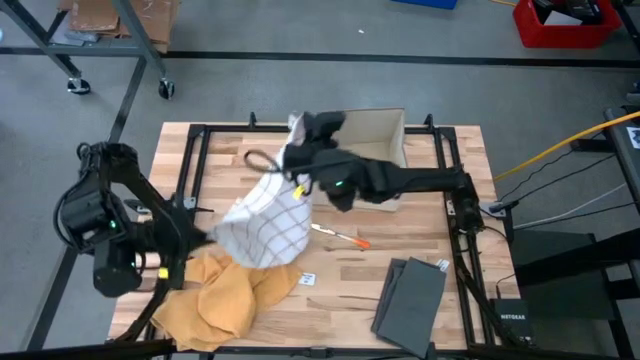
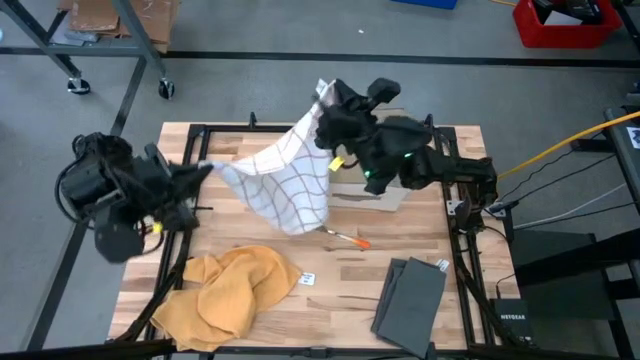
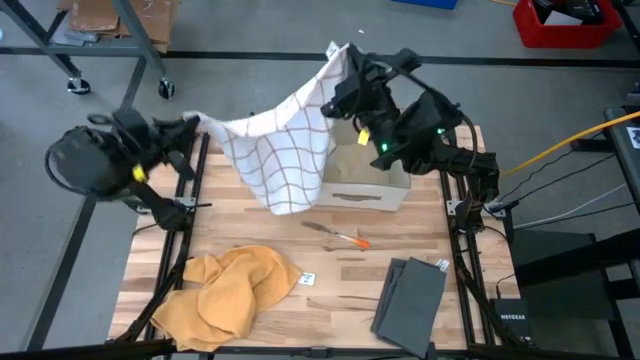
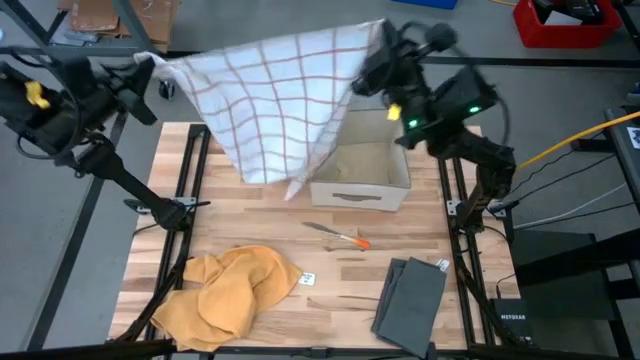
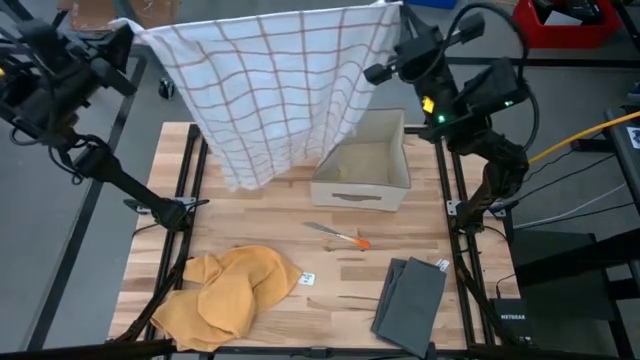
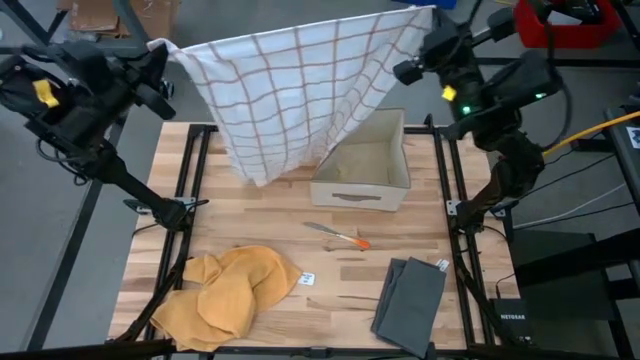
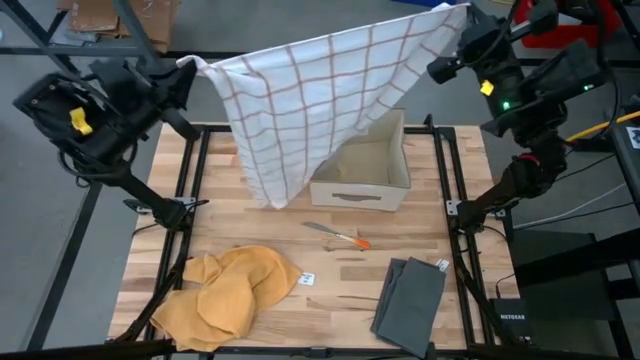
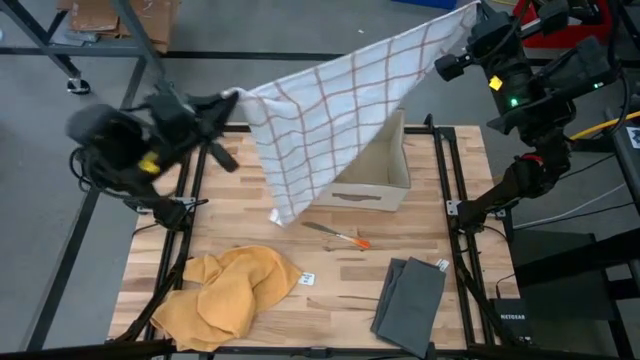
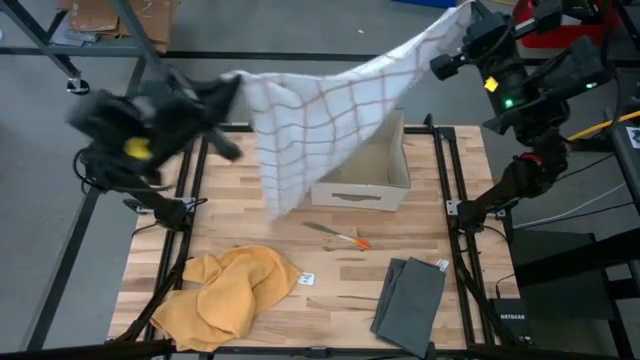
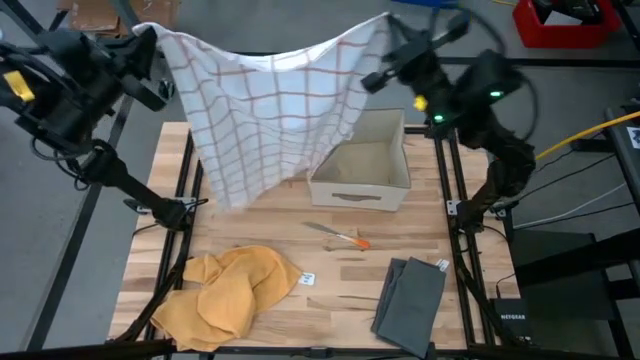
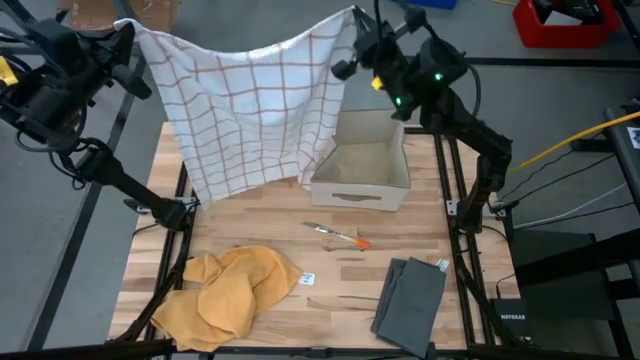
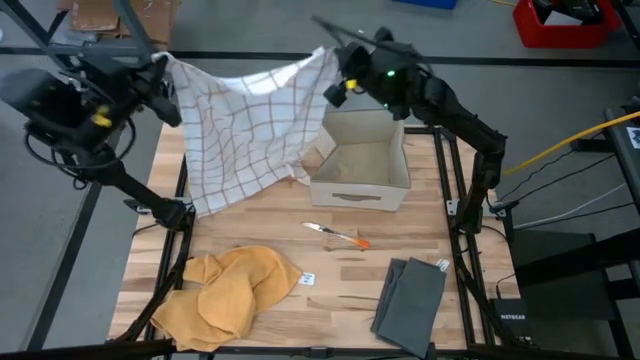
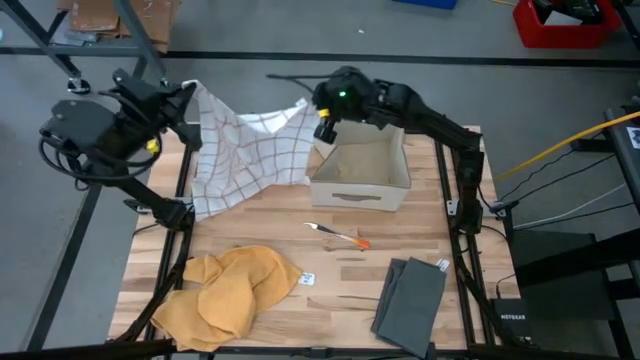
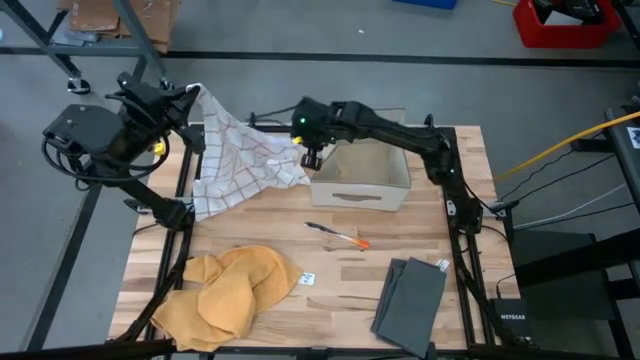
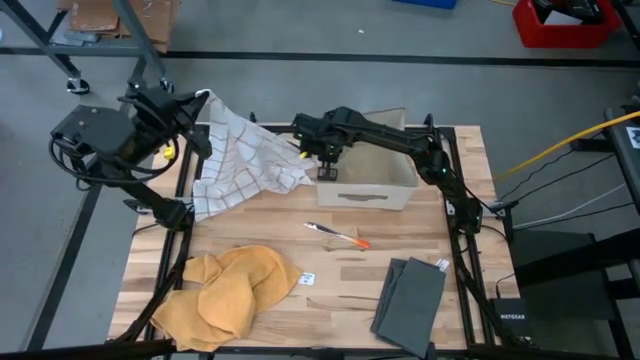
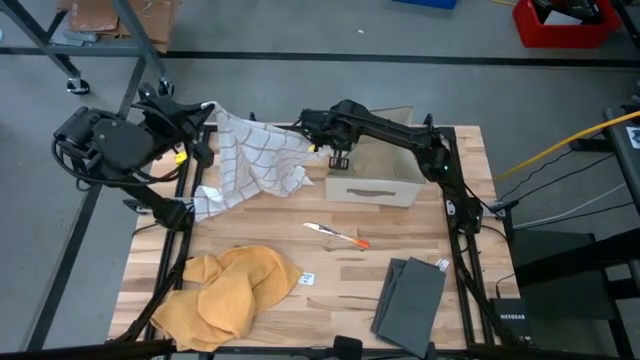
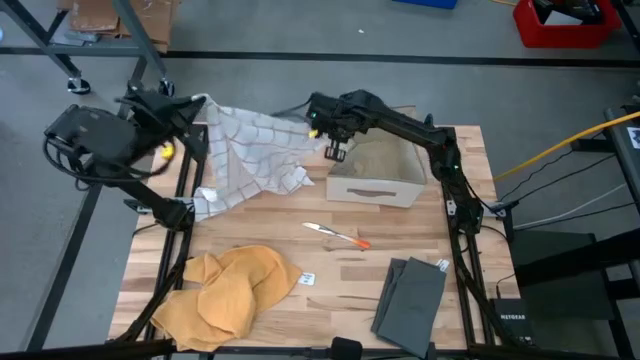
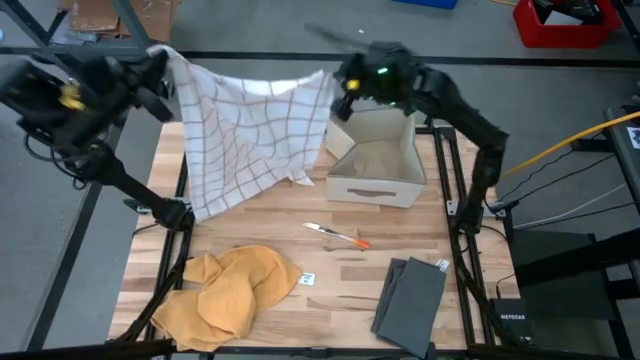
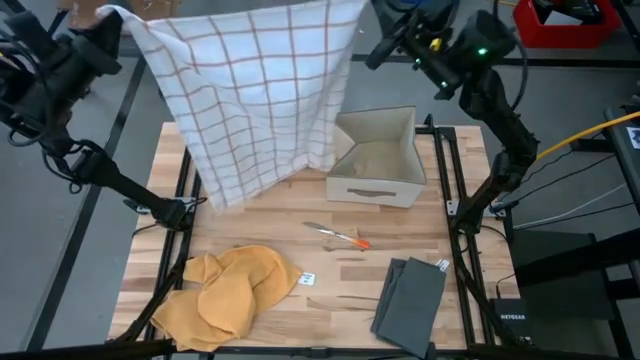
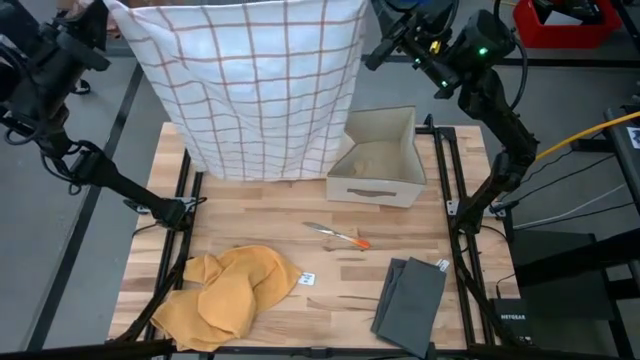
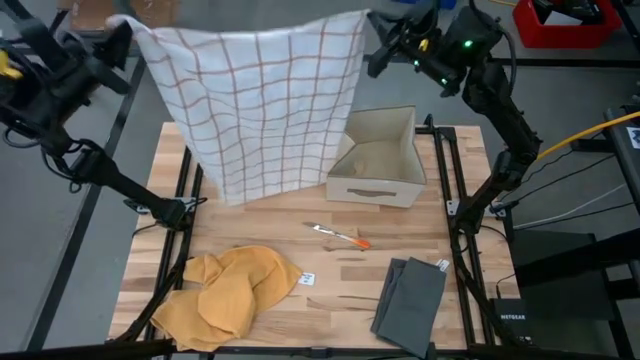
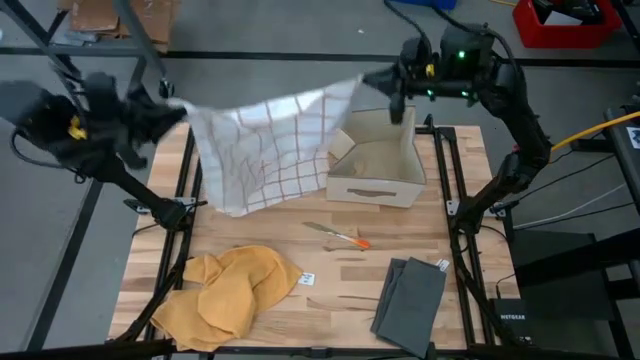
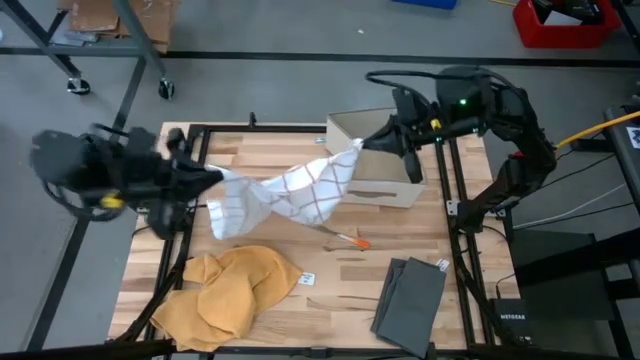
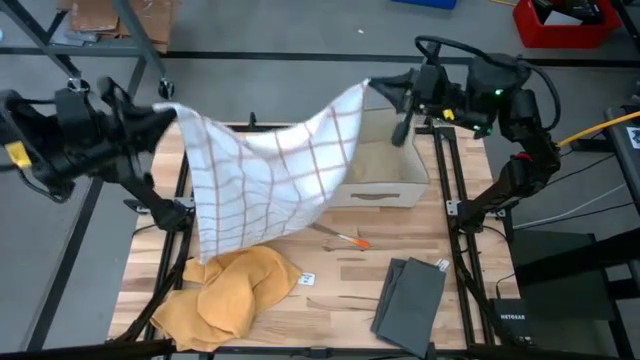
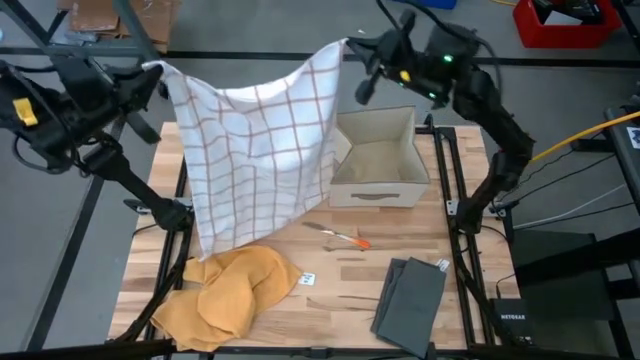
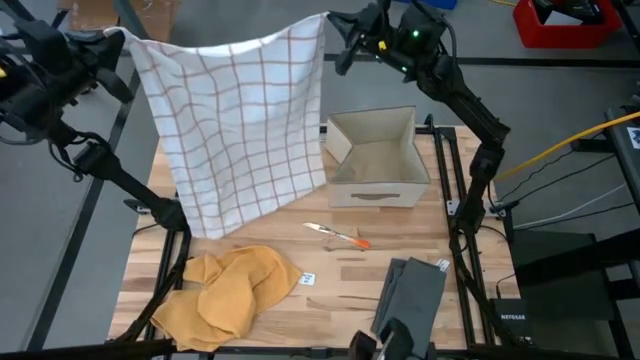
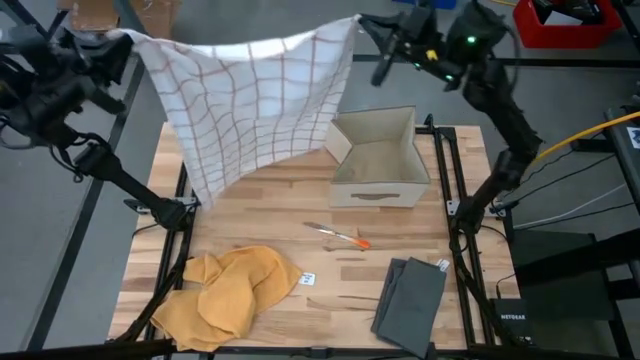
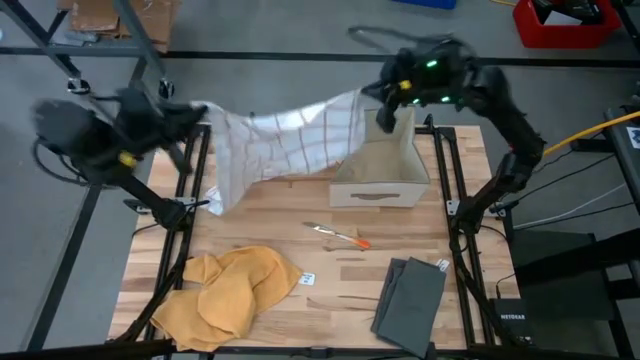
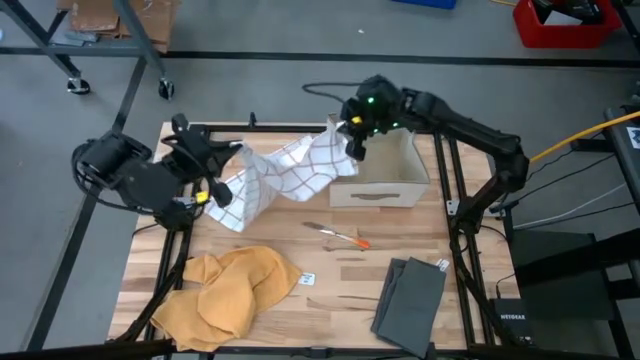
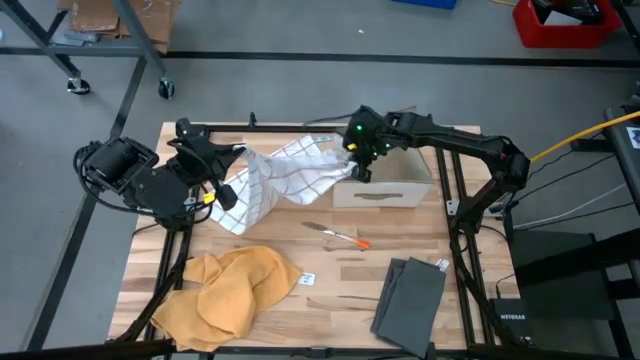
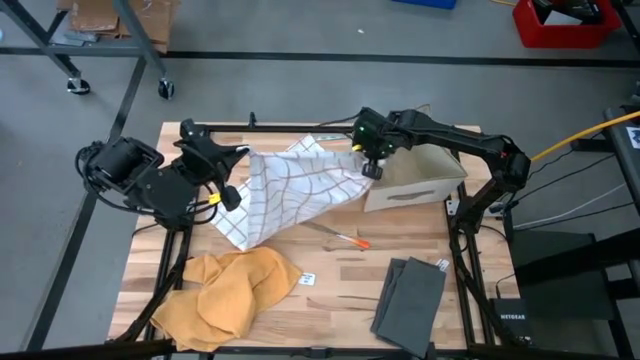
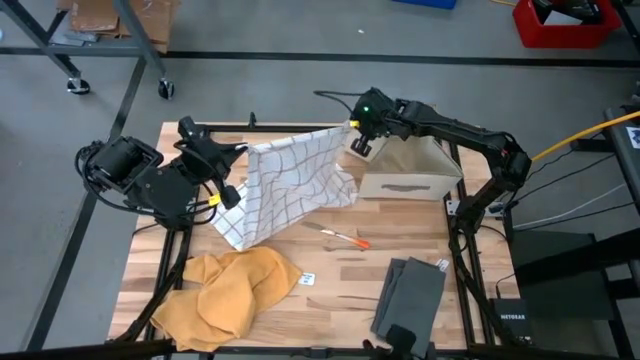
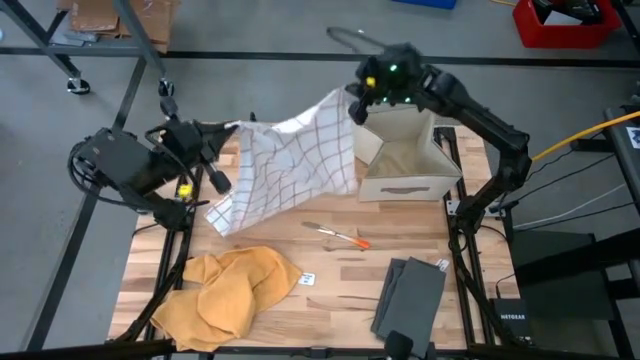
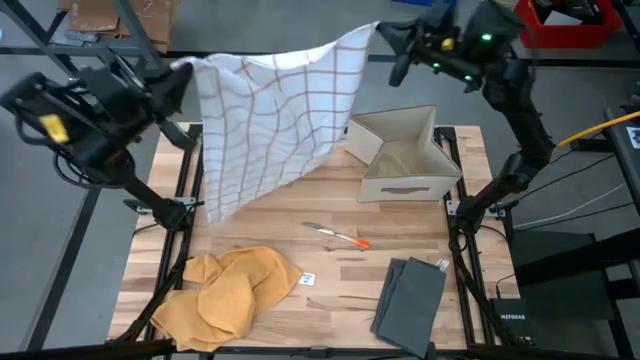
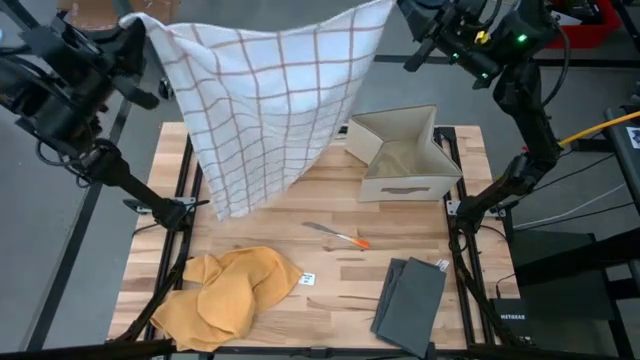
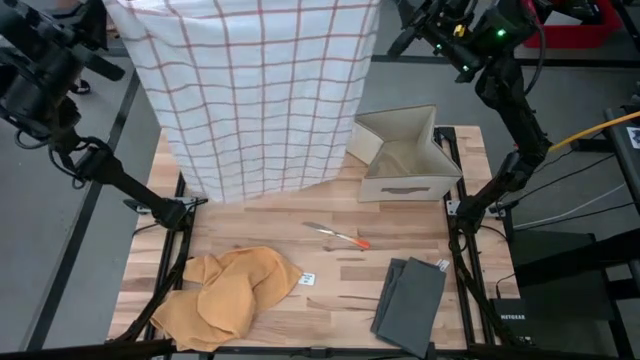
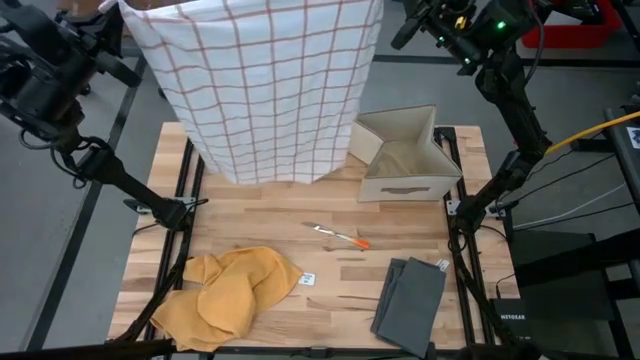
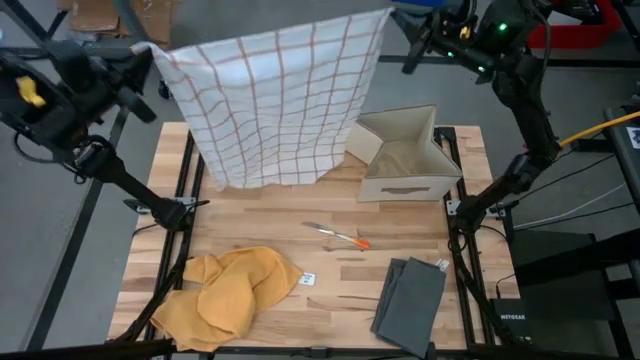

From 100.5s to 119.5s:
Task: Fold towel
Fold the white kitchen towel
